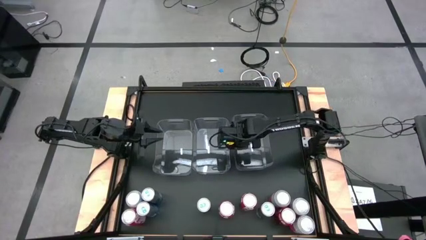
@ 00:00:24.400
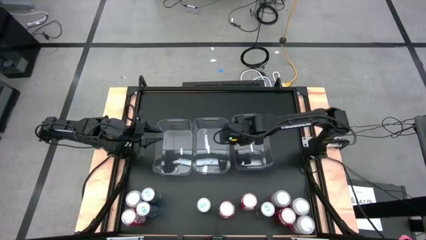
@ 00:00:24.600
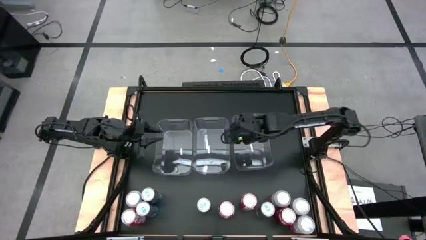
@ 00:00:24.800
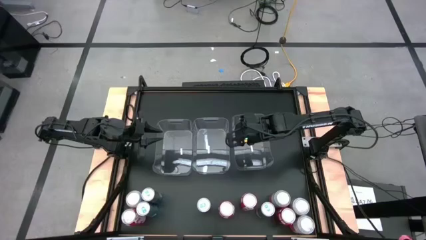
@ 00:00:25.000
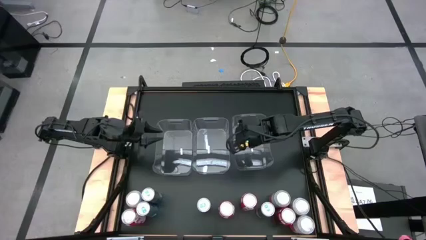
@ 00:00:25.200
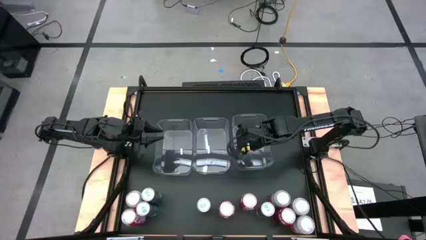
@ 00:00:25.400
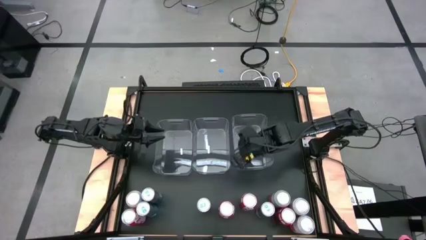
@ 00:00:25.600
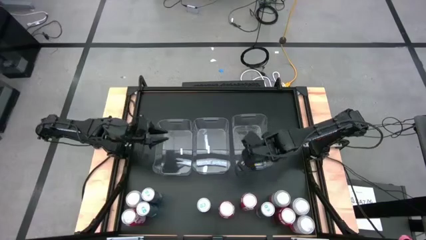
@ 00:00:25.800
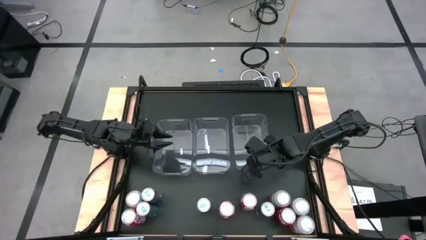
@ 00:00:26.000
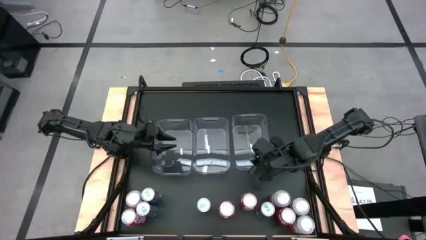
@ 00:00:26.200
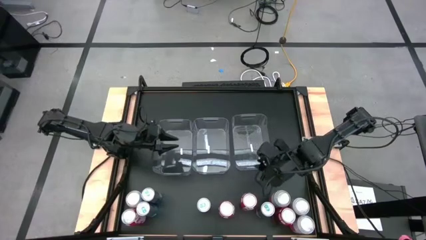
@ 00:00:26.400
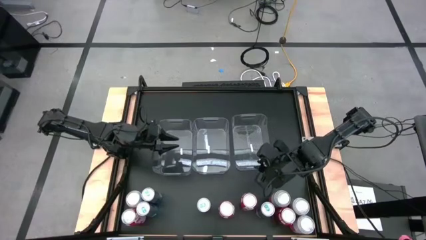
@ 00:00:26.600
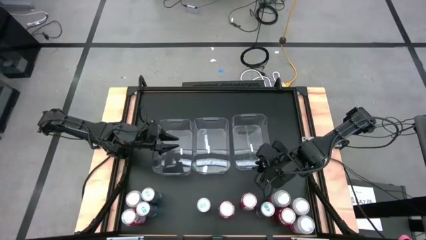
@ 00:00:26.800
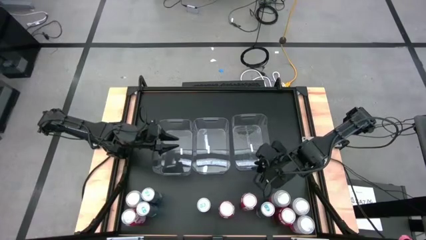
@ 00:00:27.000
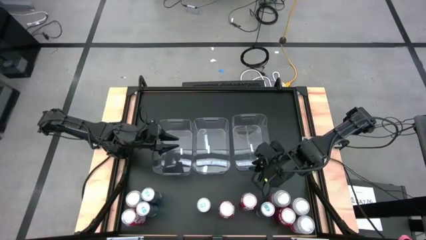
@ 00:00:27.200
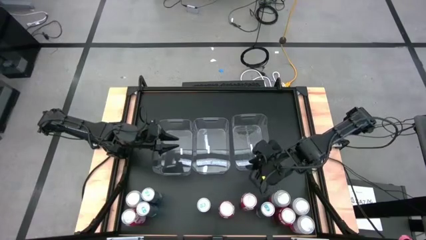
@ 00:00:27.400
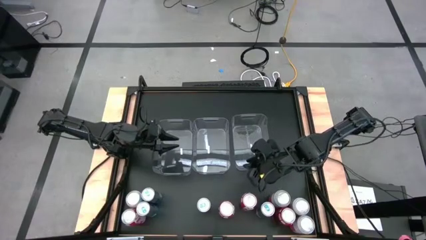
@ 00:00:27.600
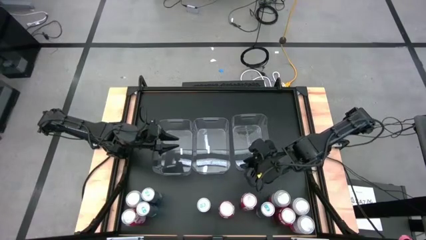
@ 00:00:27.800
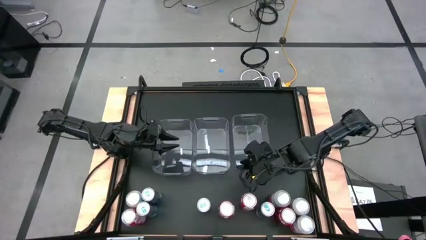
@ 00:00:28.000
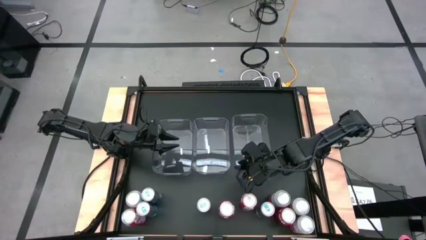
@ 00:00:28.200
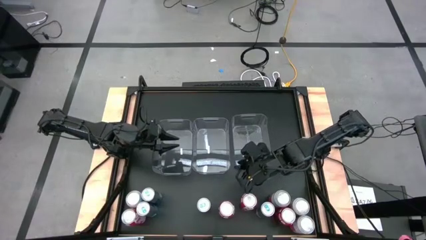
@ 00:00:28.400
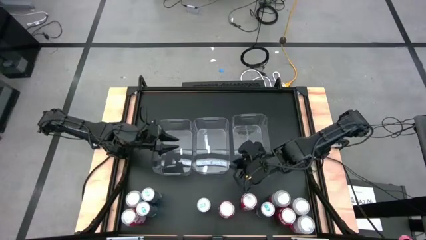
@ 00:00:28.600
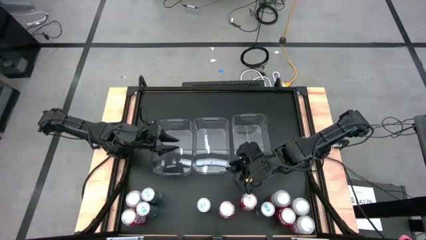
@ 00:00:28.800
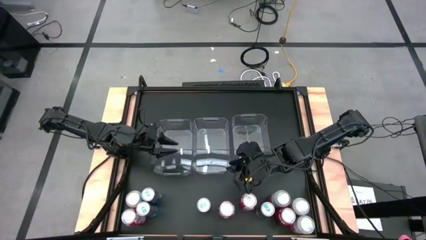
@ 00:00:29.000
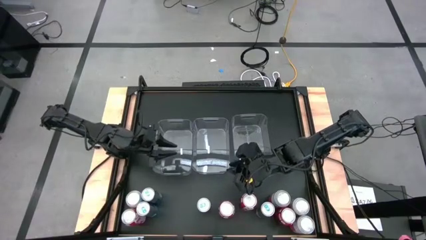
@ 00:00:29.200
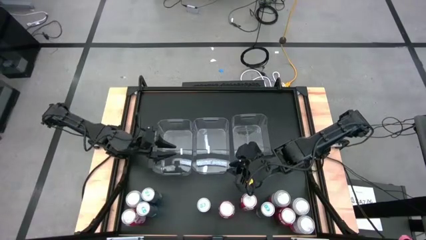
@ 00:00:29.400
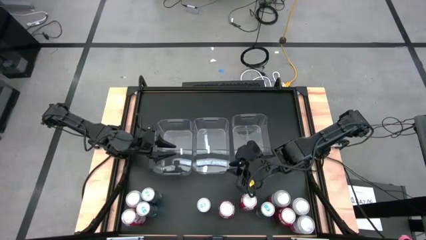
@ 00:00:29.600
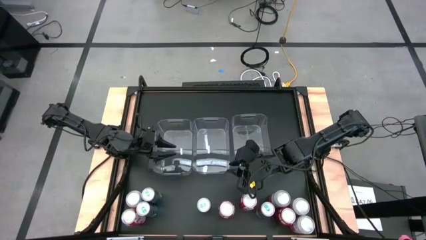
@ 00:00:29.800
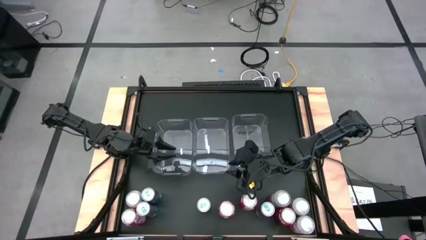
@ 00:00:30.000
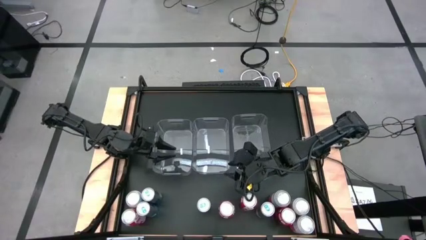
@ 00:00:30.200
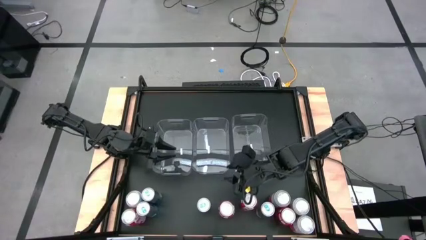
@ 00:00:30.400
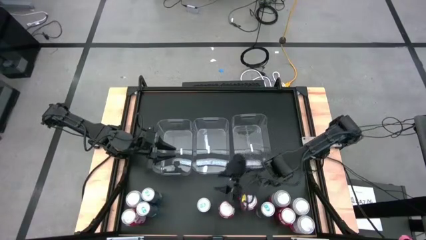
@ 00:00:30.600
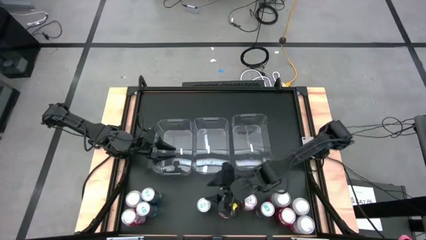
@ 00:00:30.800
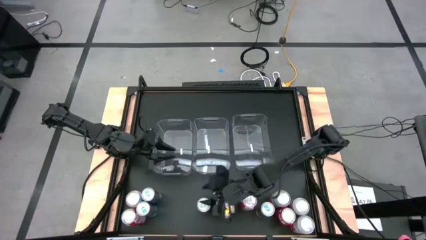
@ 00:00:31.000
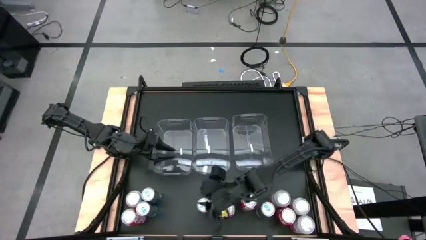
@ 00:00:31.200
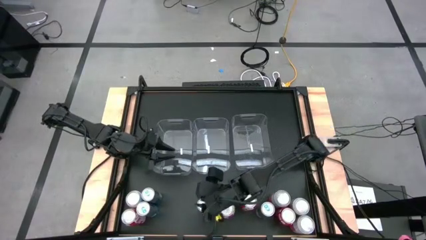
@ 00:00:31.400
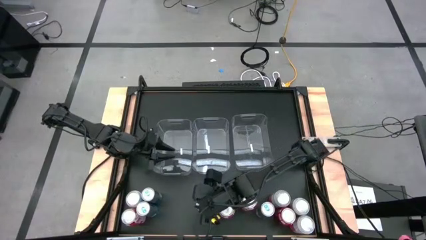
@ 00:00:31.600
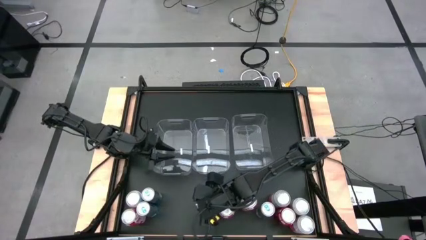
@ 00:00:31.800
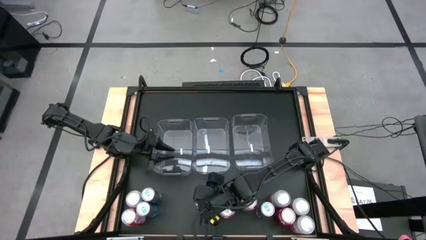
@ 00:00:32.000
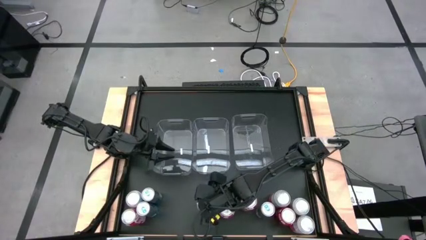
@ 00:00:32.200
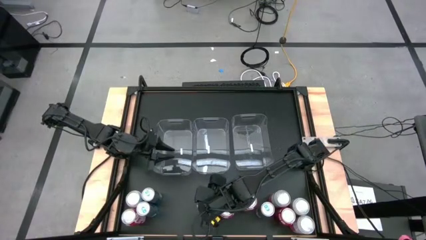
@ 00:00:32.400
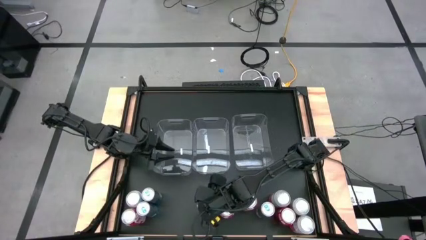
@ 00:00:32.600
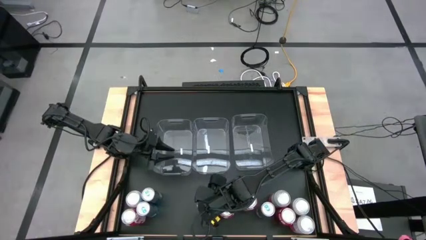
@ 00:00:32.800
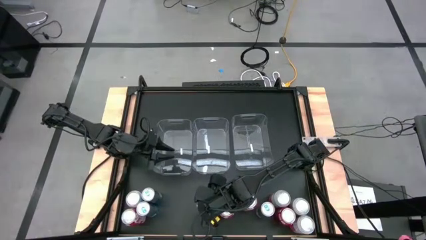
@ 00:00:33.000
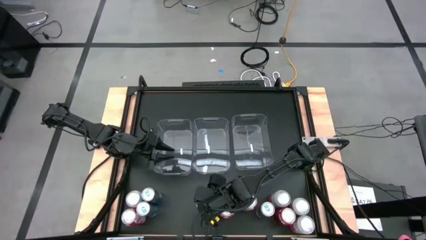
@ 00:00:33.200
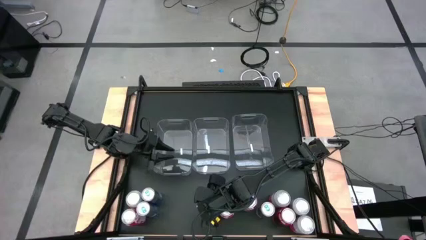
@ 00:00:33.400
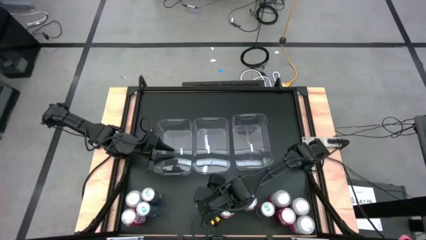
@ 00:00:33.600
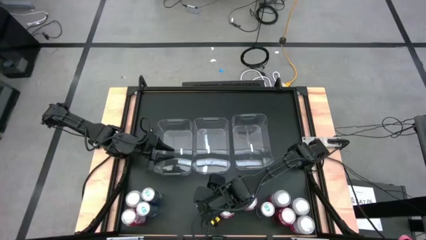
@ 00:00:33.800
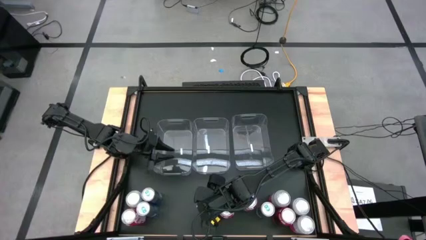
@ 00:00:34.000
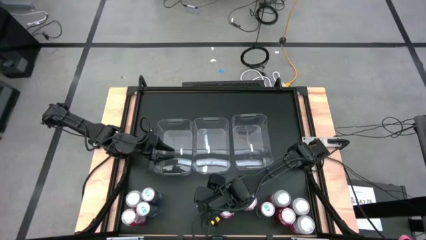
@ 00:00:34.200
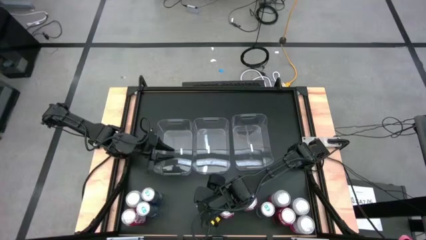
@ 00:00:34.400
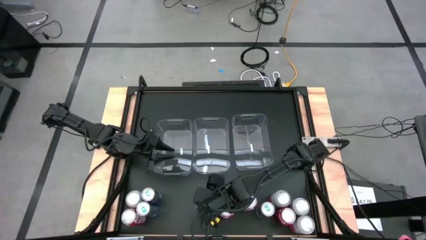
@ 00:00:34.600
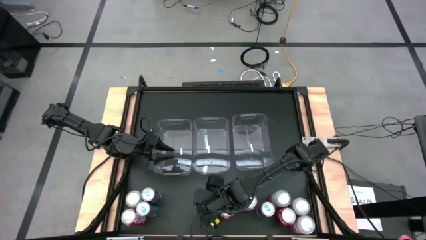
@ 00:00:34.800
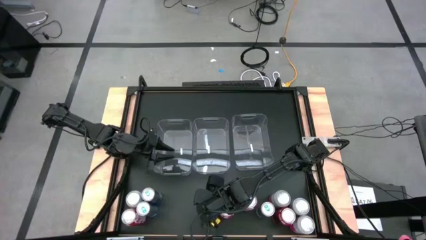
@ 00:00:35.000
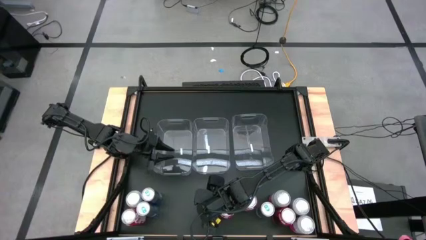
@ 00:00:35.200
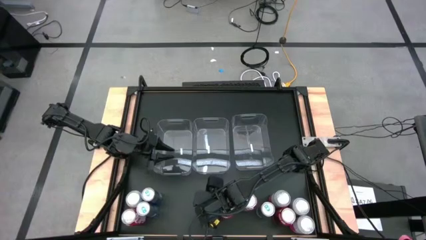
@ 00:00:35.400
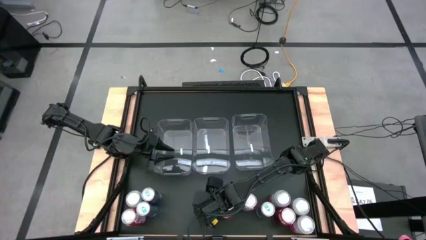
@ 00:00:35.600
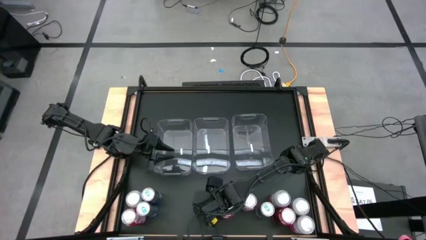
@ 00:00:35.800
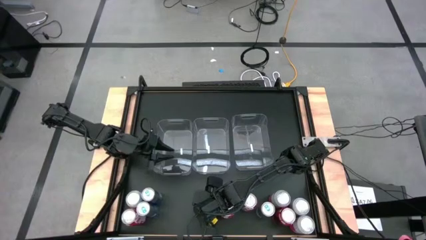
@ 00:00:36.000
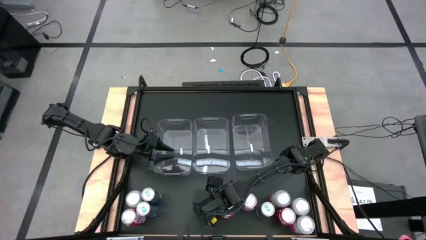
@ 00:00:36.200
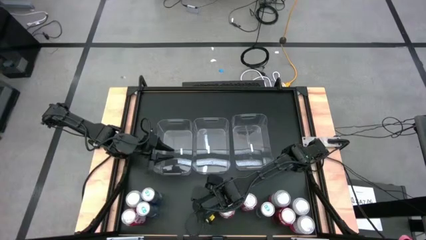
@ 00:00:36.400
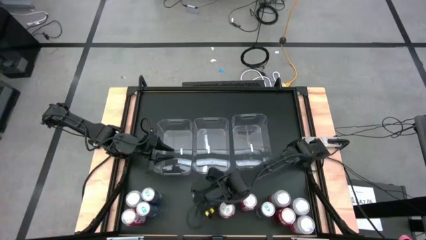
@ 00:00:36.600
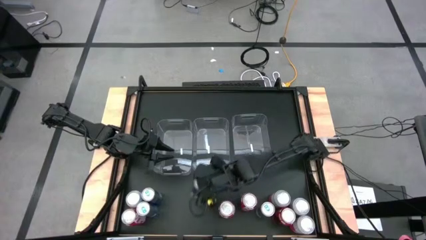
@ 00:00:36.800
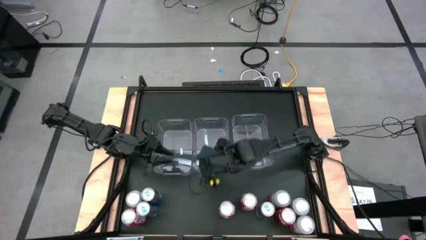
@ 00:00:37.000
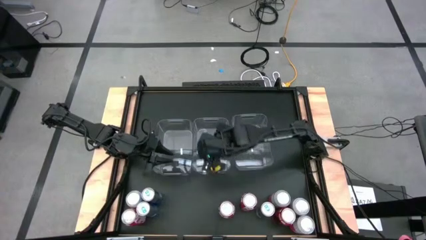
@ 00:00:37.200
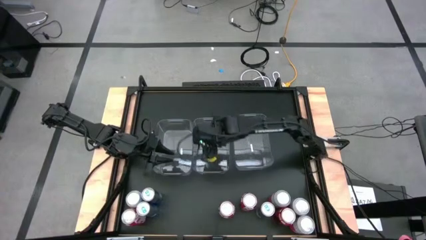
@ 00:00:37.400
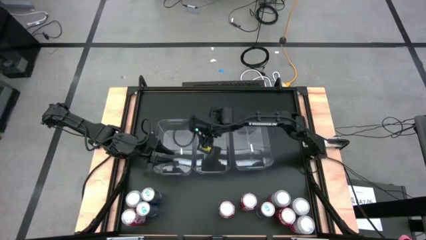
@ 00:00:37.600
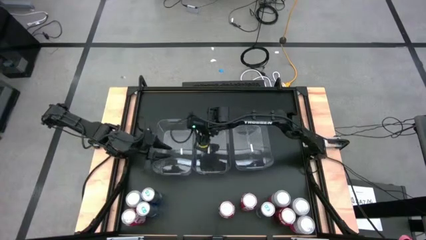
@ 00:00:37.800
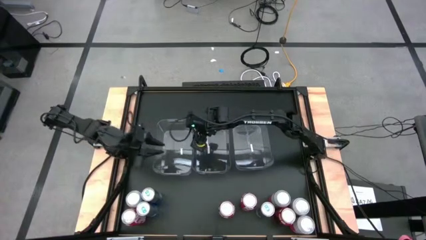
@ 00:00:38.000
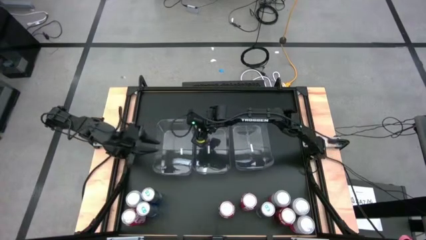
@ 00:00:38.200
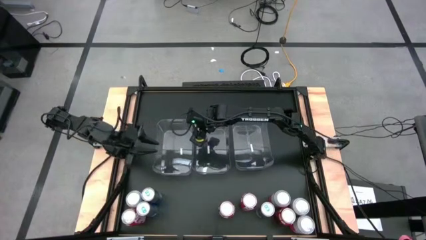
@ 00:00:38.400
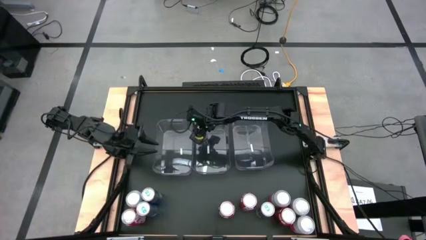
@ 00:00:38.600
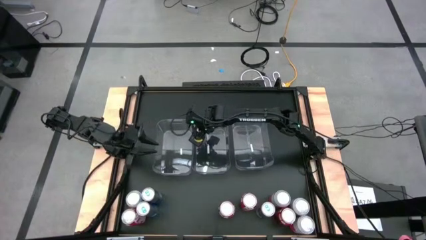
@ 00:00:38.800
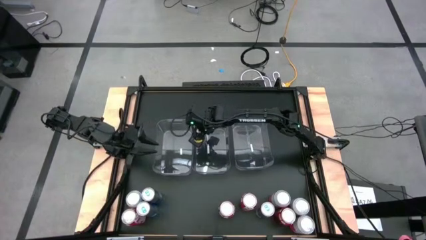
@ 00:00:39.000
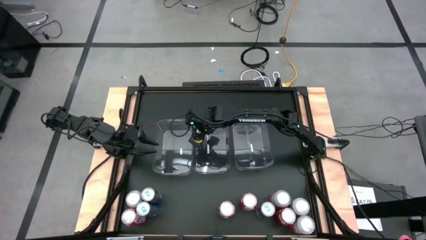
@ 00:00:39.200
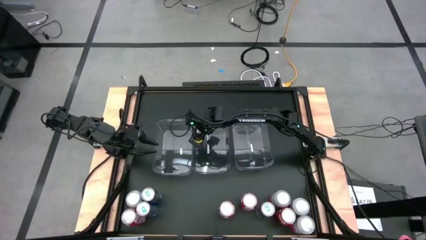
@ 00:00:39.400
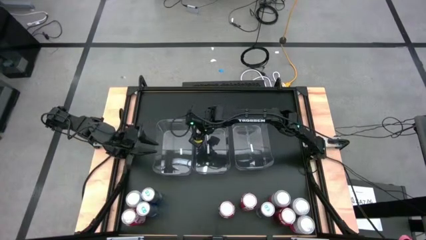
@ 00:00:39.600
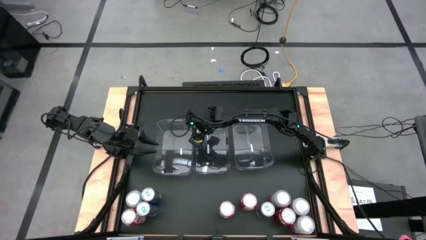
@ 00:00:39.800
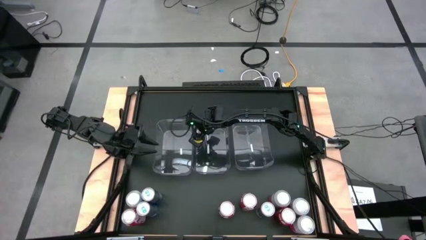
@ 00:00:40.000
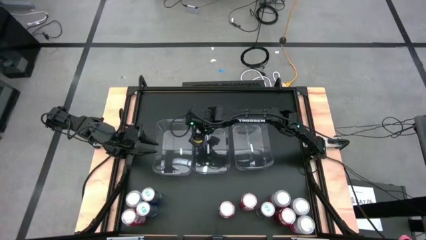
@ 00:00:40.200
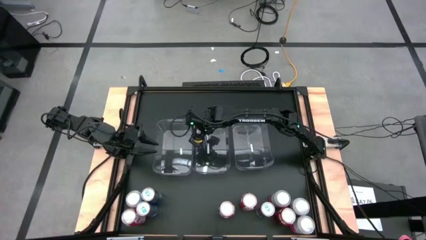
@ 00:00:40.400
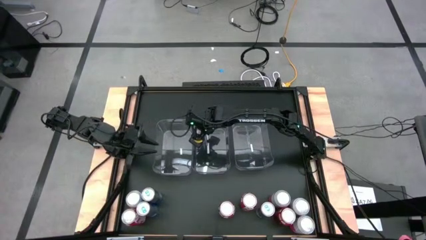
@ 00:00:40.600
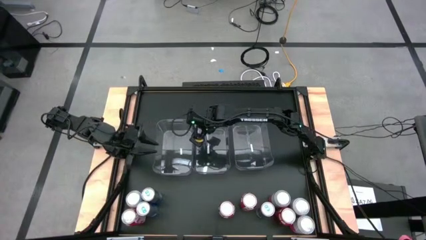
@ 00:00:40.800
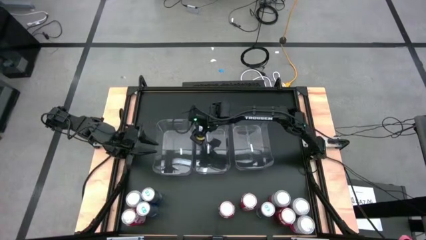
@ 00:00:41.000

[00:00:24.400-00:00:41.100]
Task: Sort soda cans
Put the blue soda can into the middle transparent bin
